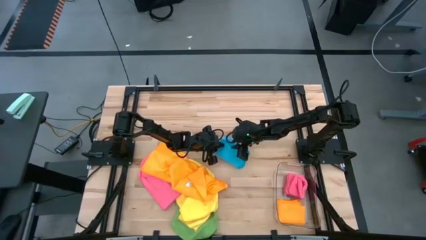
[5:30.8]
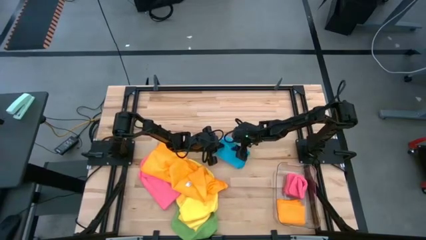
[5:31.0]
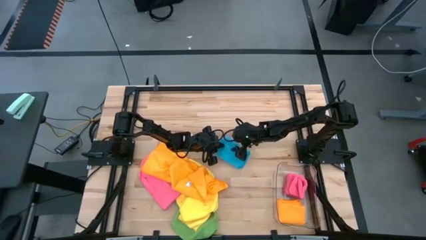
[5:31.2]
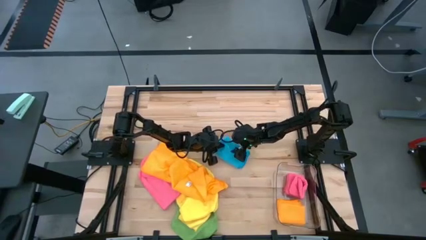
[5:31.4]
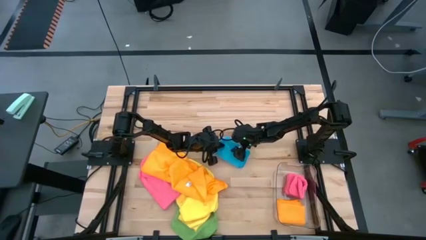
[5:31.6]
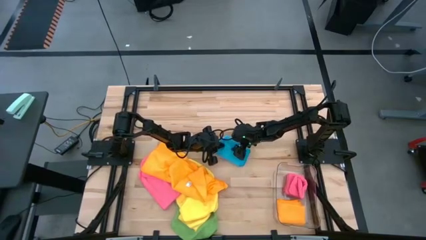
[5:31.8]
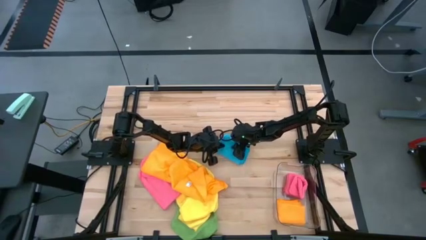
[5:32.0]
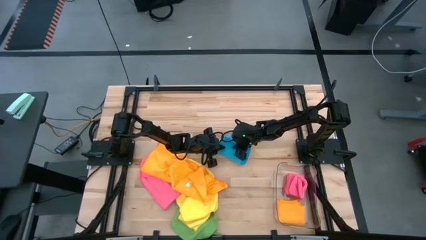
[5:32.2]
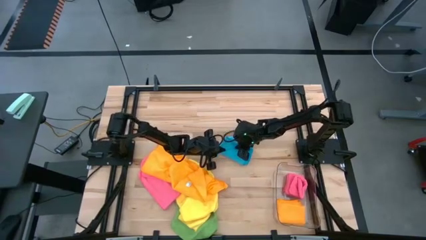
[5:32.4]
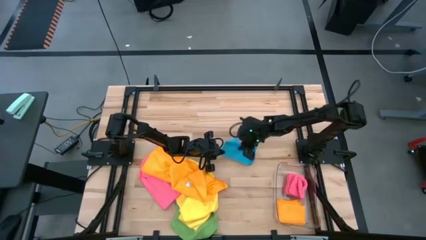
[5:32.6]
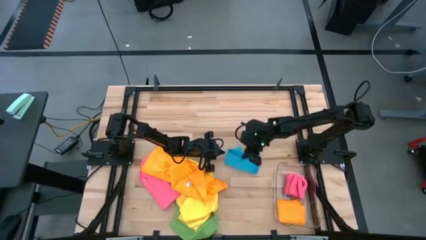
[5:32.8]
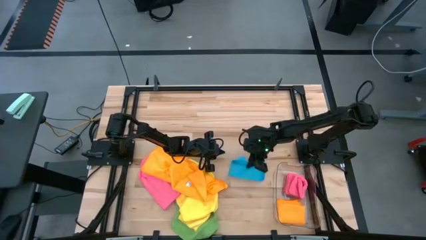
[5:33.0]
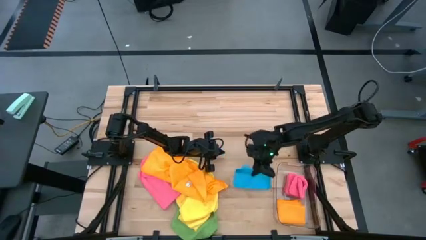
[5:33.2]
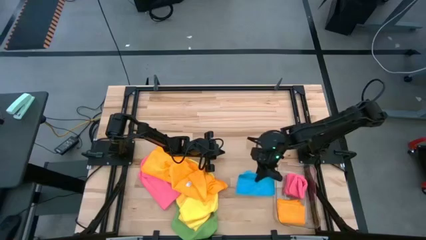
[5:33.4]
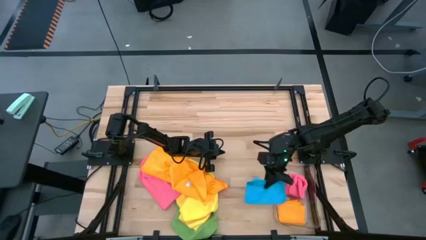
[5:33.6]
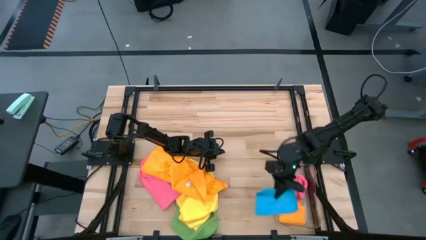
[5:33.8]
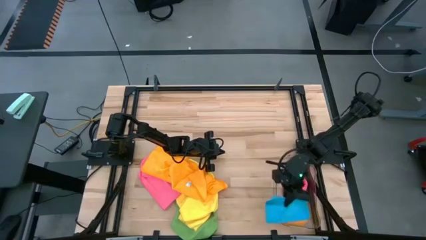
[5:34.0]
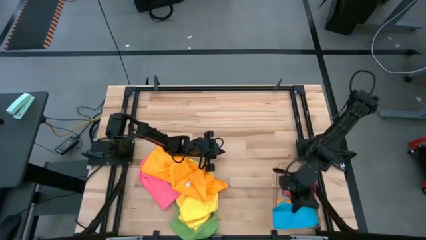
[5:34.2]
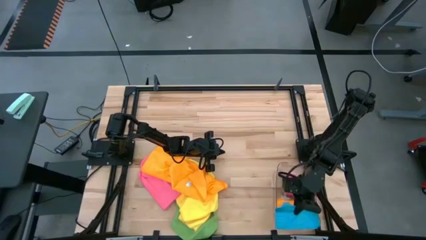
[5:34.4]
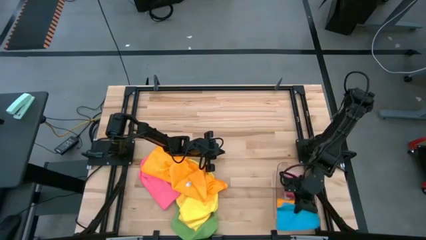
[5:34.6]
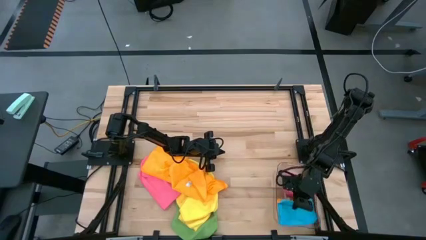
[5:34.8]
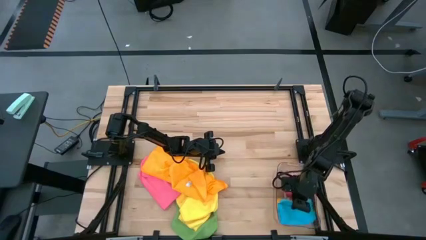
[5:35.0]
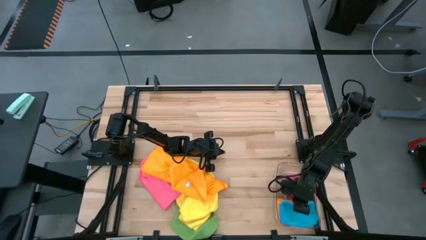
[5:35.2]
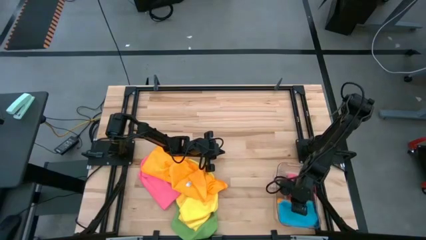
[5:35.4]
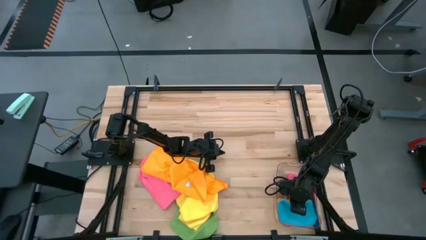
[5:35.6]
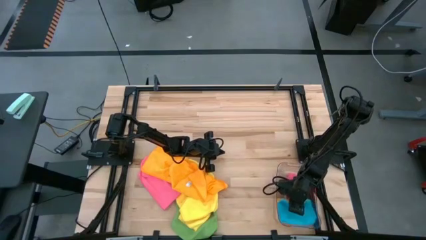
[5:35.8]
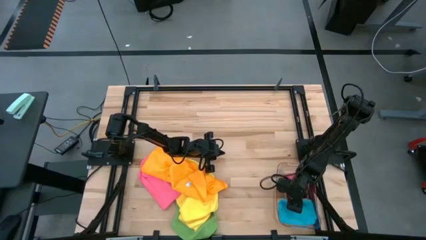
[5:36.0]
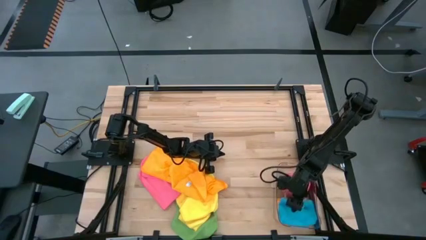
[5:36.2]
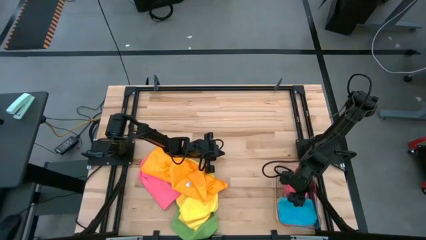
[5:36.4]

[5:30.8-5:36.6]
Task: Fold microfiber towels
Put the folded blue towel into the transparent bin

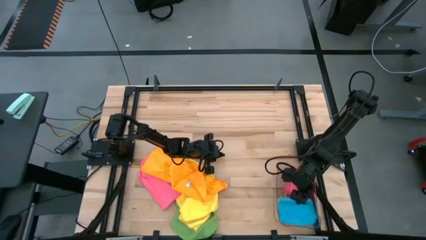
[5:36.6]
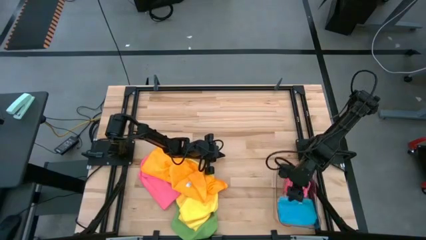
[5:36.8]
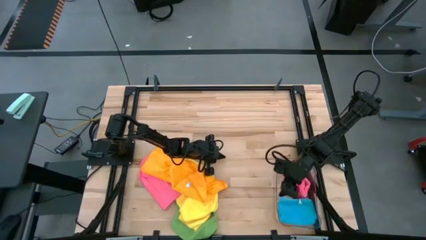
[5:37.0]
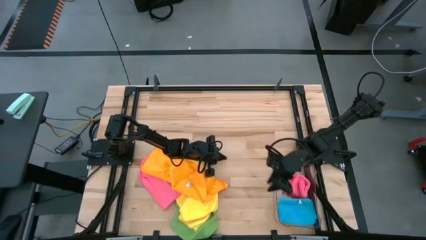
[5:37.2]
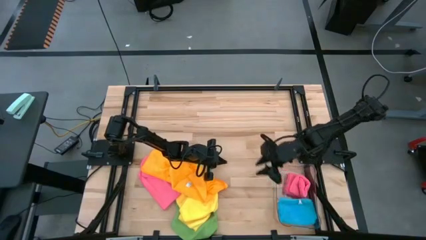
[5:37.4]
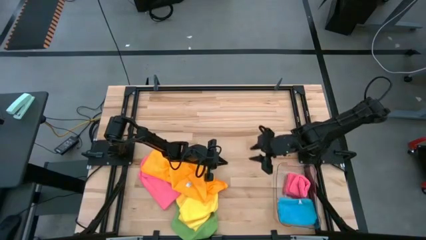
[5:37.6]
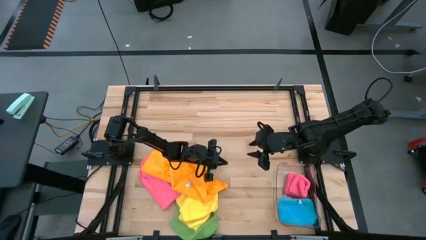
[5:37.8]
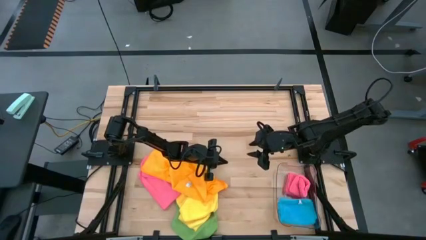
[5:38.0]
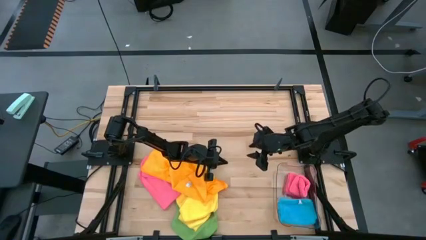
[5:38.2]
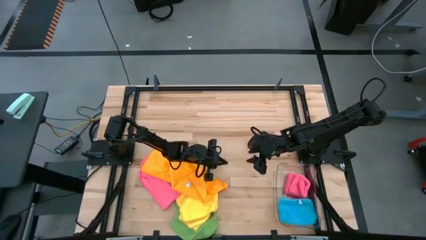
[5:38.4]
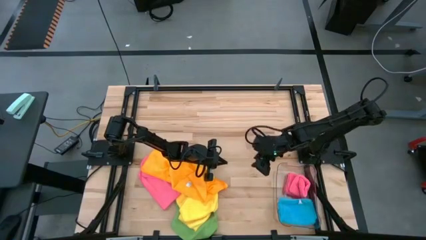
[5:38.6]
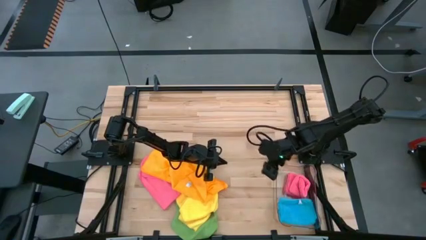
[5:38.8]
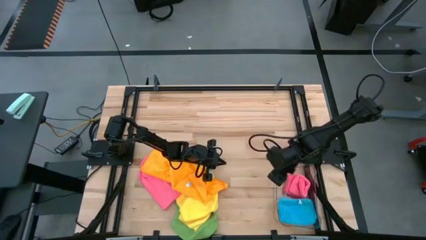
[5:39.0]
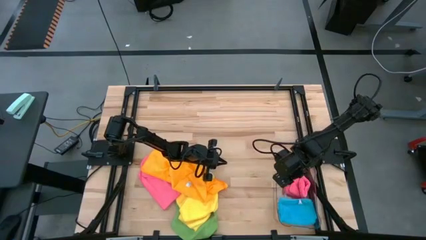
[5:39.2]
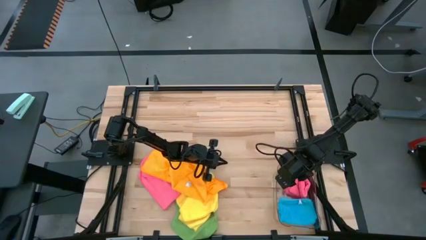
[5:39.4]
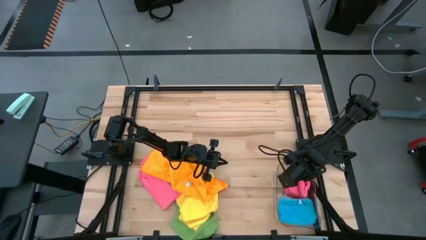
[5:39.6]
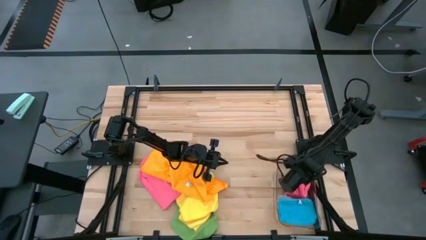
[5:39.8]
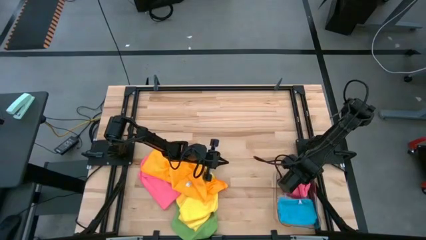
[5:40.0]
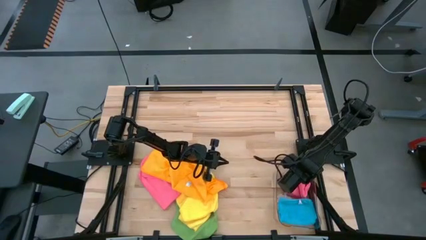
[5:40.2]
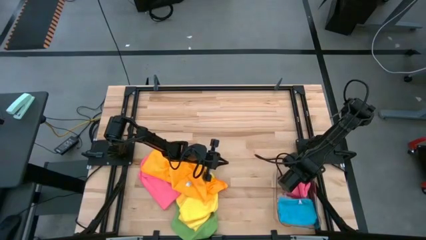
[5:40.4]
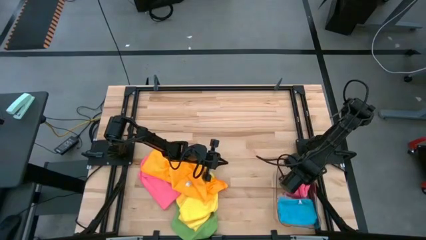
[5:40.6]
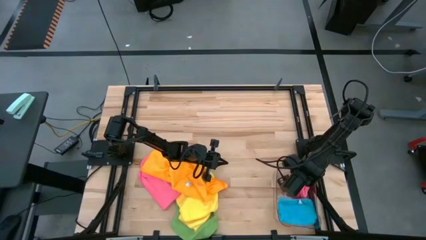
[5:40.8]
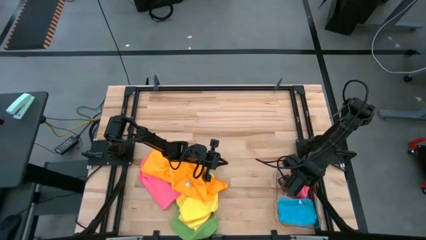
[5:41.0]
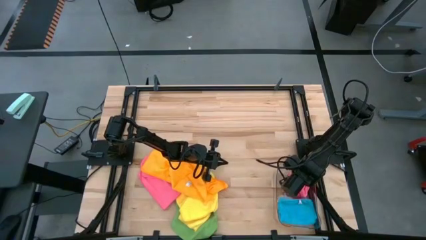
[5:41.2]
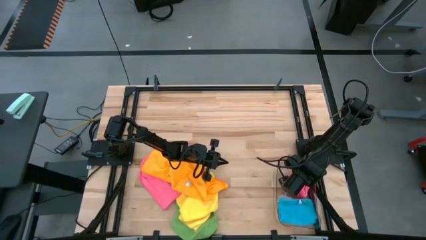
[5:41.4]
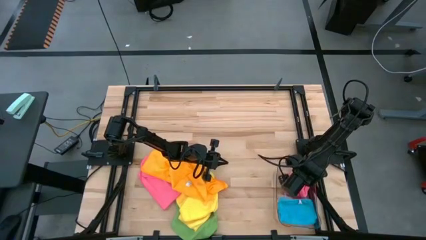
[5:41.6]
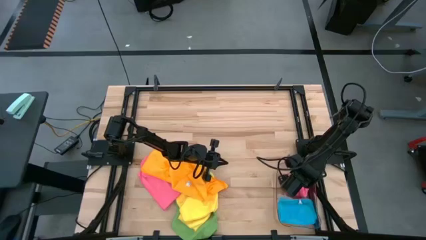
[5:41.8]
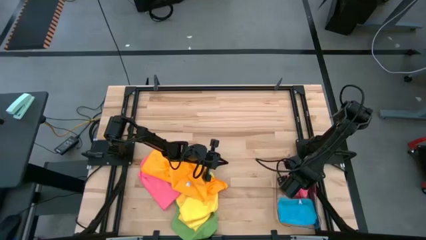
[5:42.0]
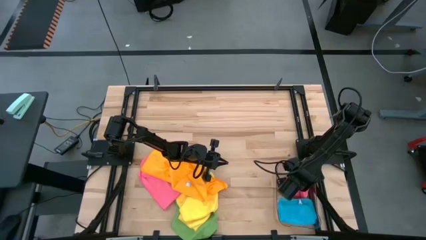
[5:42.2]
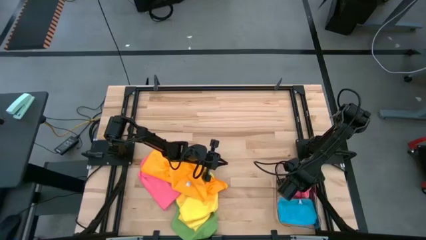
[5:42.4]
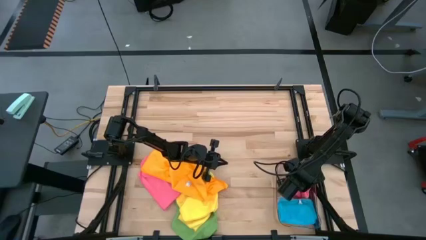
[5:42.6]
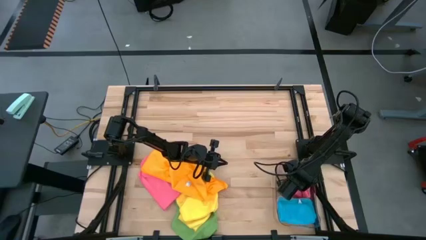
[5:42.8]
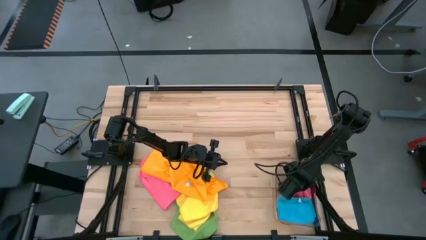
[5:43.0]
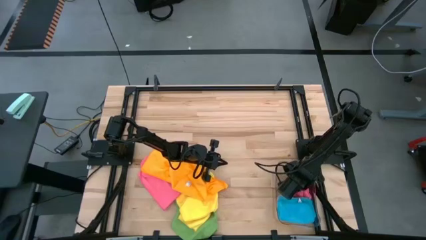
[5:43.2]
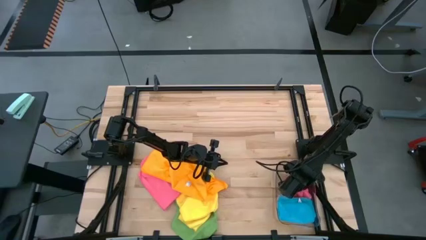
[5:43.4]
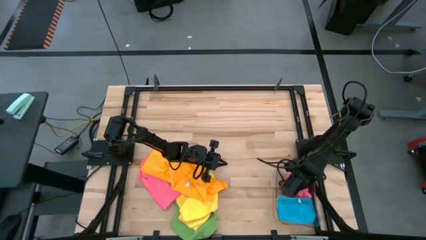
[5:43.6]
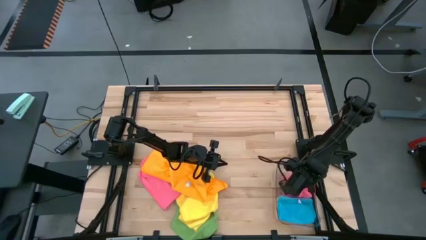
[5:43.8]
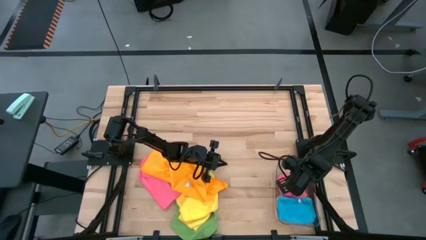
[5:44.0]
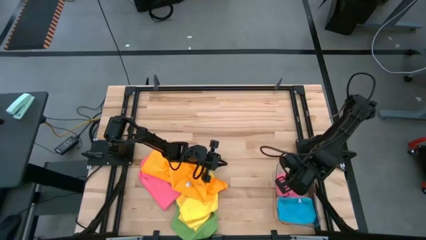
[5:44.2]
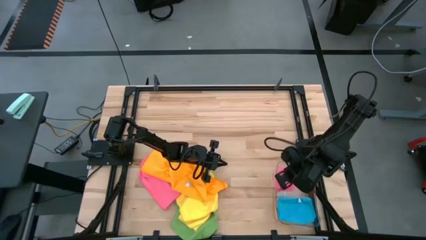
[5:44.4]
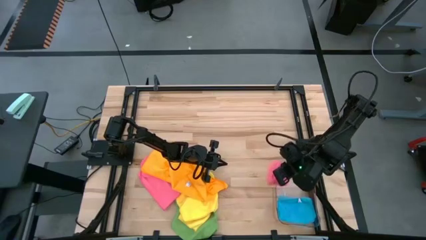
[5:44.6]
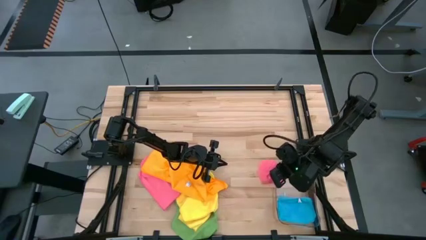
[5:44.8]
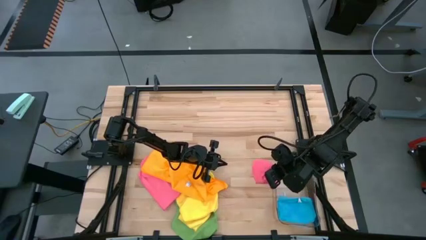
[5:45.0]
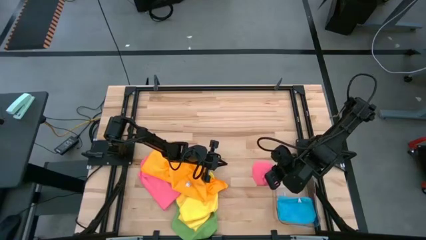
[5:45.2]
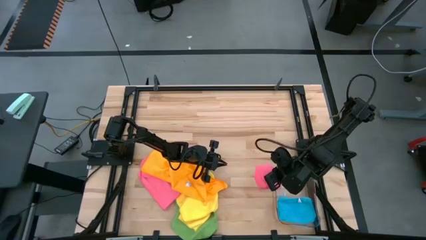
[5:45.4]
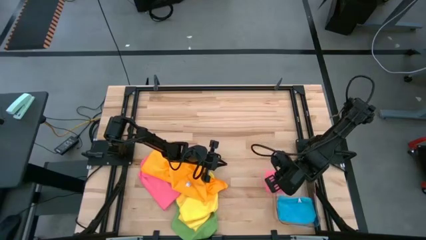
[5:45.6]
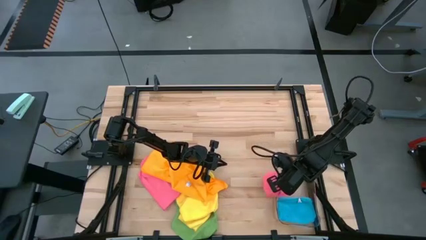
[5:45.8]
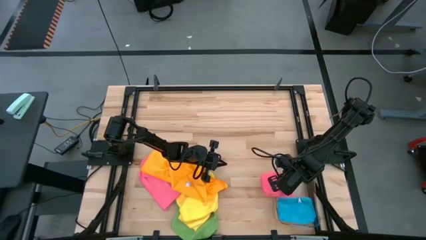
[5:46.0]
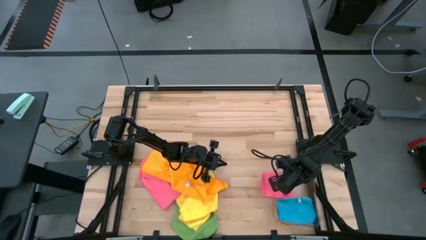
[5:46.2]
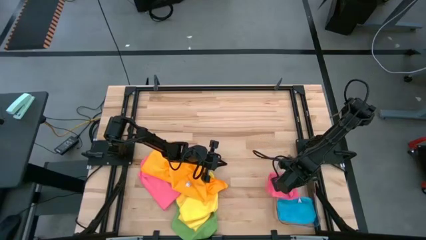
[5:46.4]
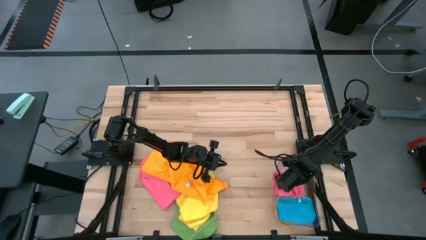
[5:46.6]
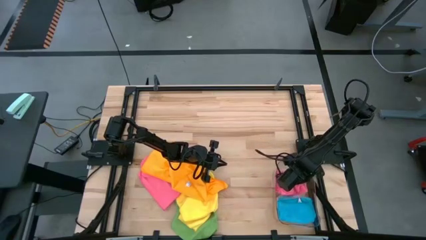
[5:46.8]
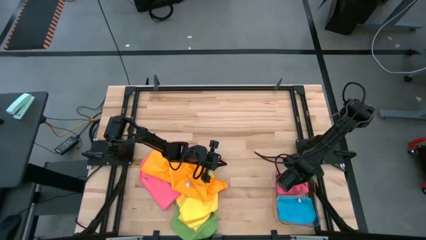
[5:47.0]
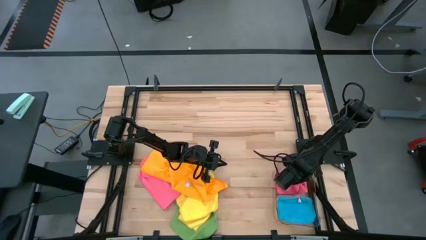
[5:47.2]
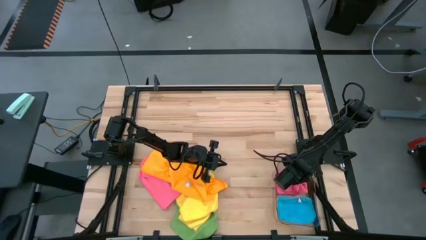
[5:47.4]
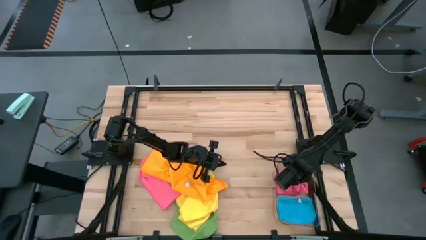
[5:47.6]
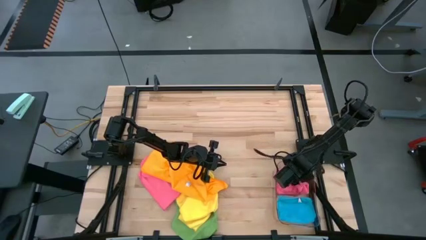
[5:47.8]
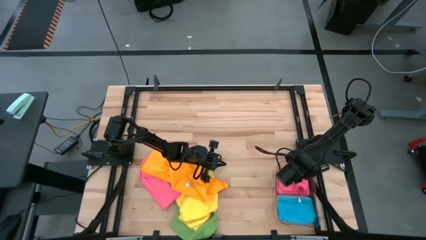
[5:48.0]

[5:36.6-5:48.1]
Adjust the folded pink towel in the transparent bin
